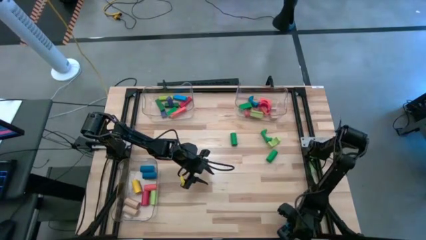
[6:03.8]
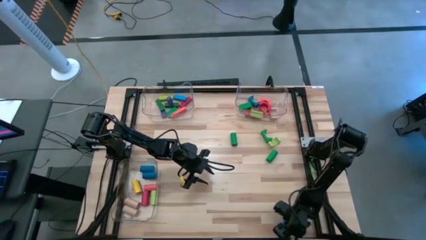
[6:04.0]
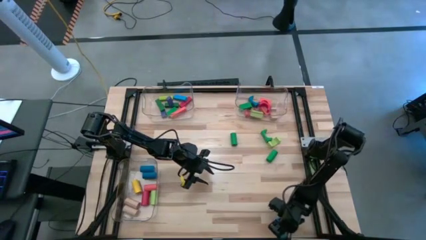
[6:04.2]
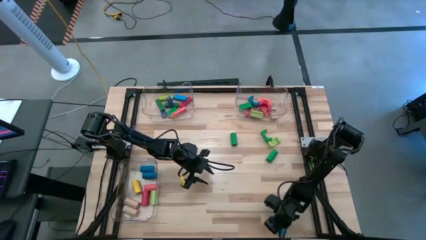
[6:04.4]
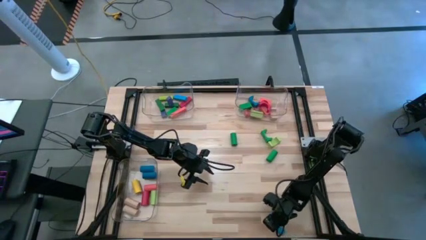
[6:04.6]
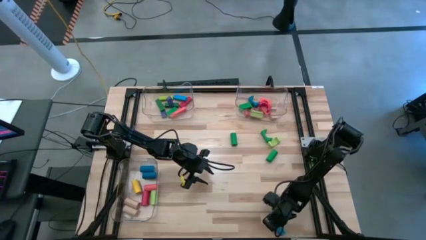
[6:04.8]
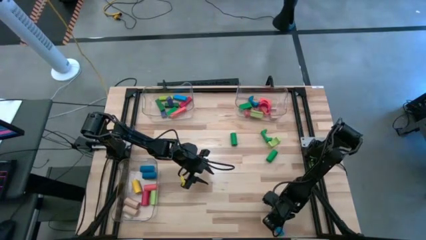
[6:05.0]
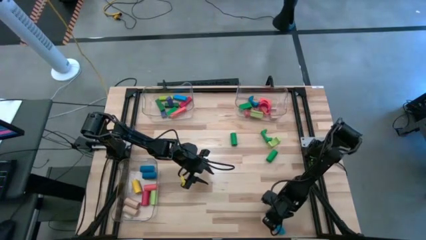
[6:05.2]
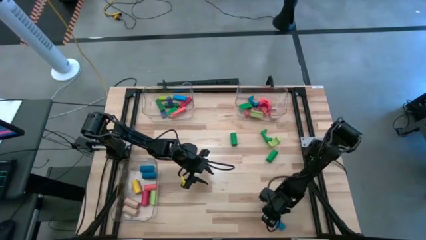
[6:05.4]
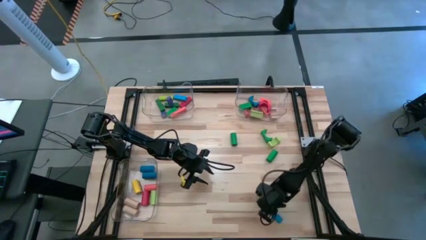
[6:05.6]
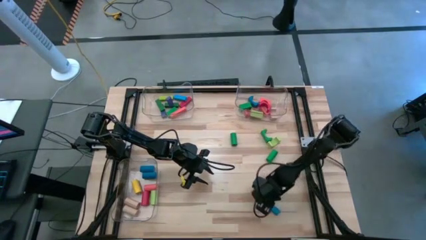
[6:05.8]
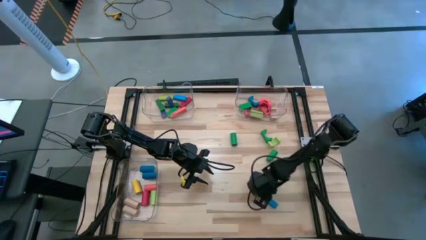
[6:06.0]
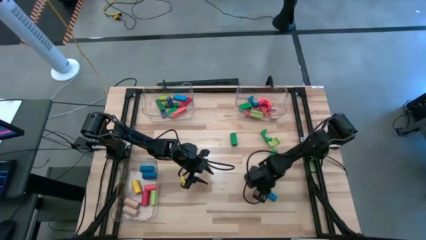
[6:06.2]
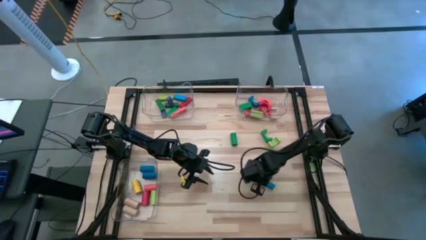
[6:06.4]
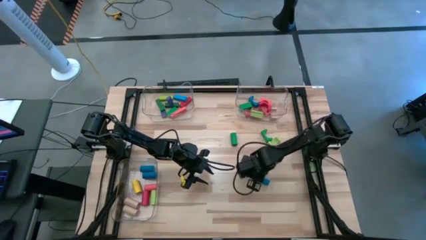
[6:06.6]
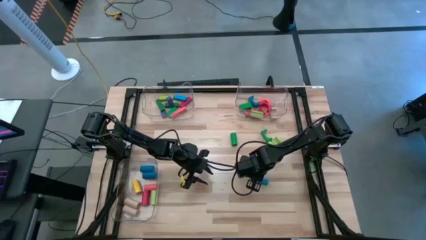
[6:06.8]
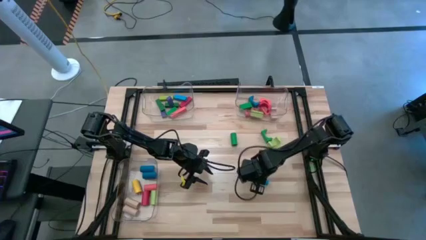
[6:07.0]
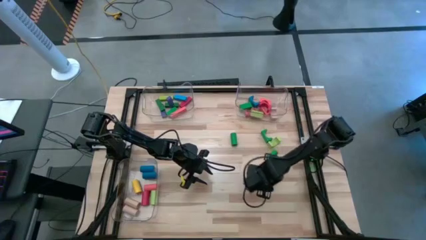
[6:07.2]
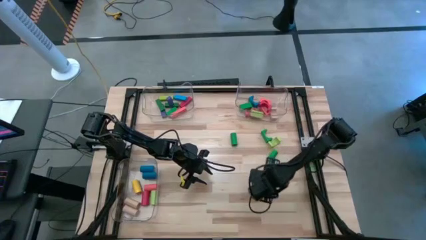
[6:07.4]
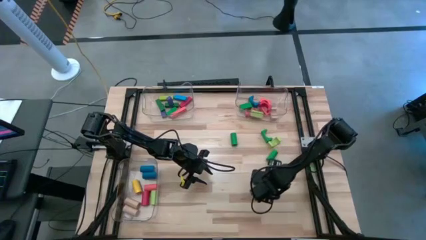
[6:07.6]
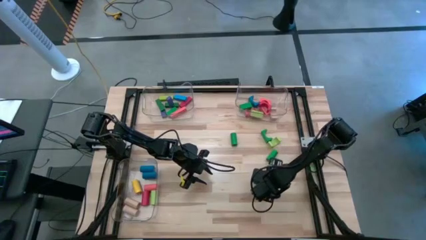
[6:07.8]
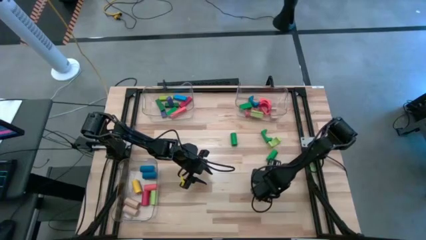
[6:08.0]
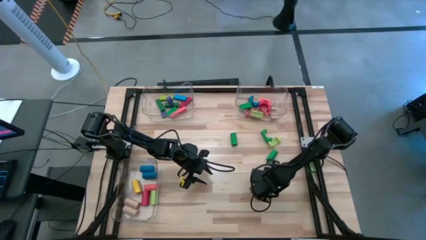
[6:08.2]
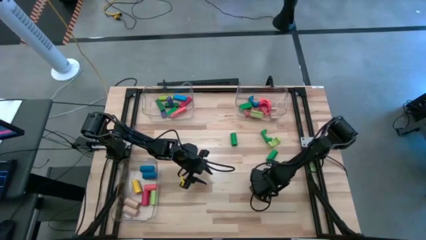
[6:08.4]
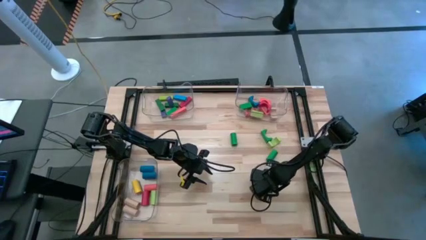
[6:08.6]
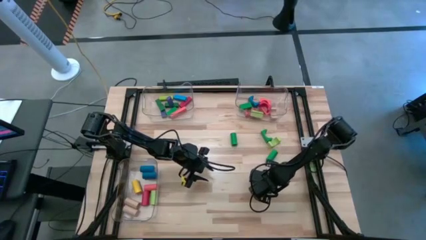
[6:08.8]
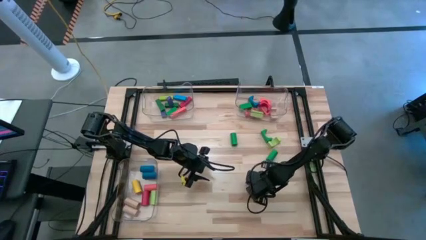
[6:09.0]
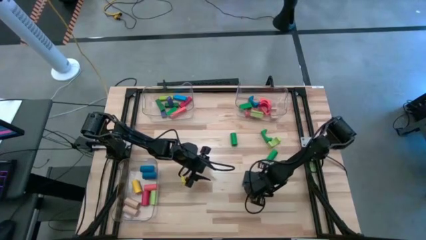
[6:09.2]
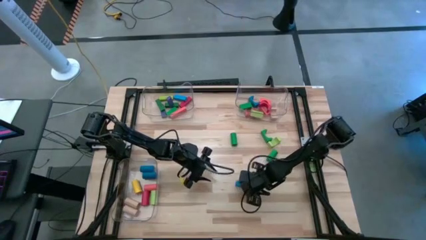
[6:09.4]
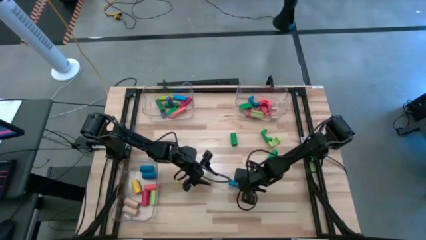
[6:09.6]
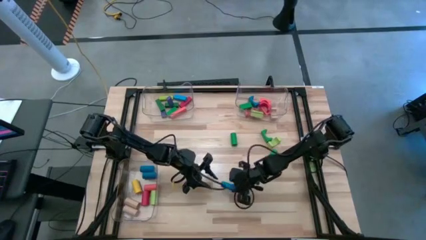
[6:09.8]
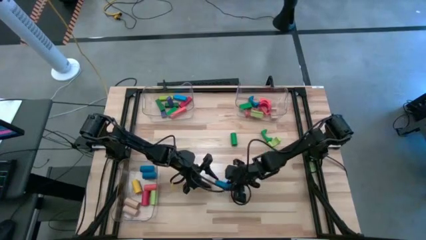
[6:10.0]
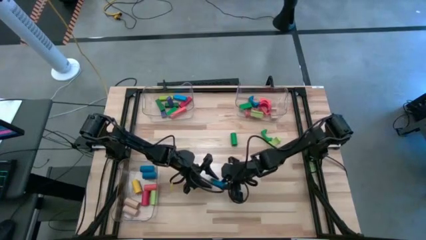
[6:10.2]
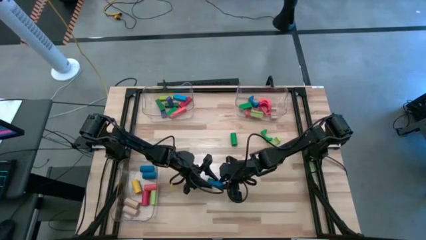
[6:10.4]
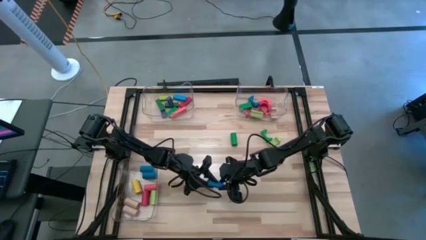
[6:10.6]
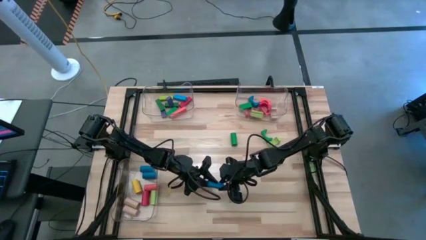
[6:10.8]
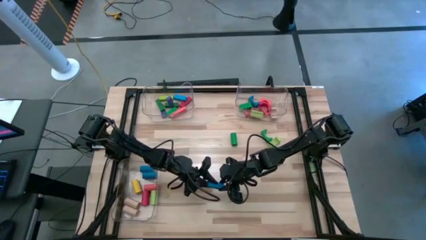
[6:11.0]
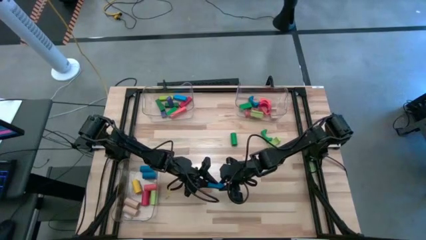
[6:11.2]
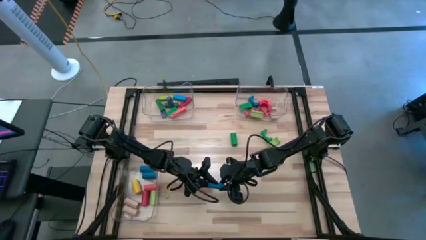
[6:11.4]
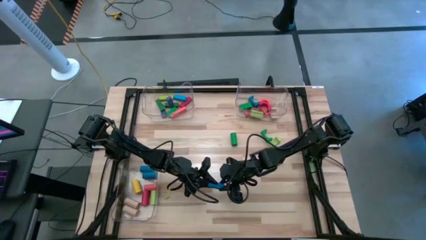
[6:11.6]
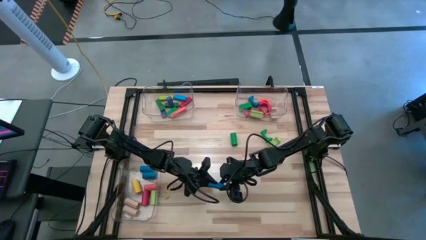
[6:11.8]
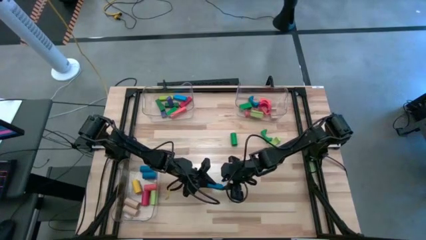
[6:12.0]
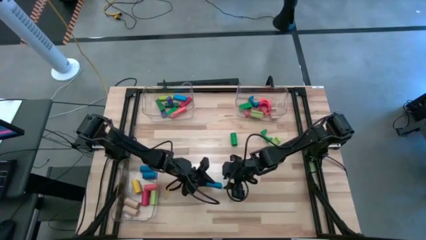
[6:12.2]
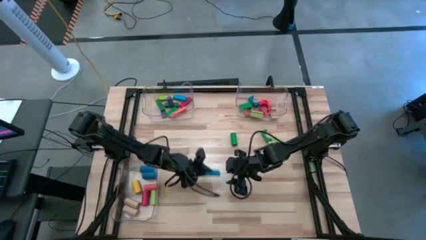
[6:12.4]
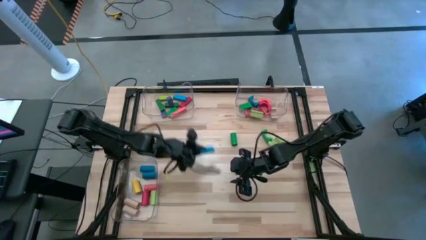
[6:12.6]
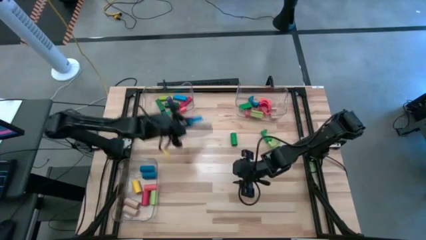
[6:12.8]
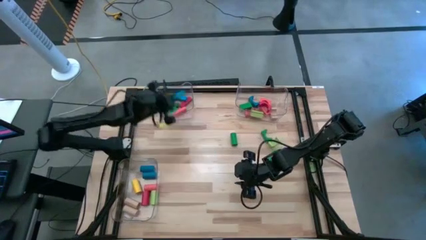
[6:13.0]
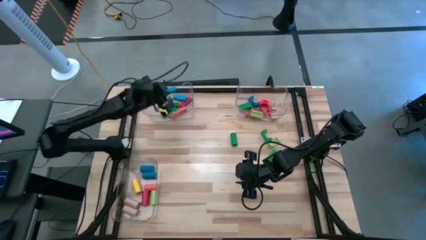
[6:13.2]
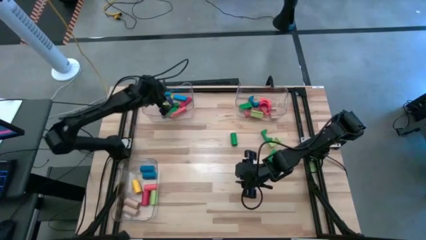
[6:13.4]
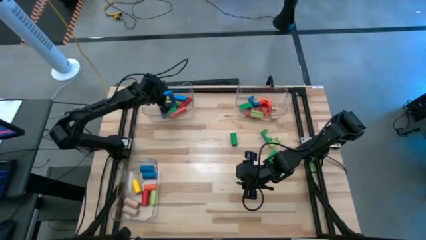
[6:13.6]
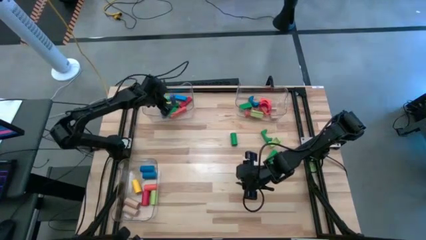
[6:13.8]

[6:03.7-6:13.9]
Task: Sort blocks by size
Put the blue rectangular block into the top left transparent bin

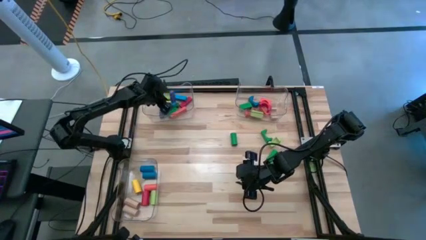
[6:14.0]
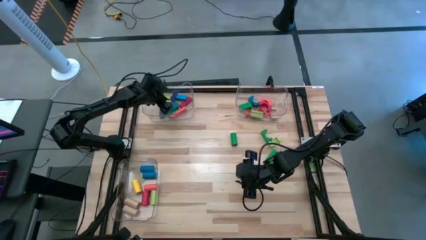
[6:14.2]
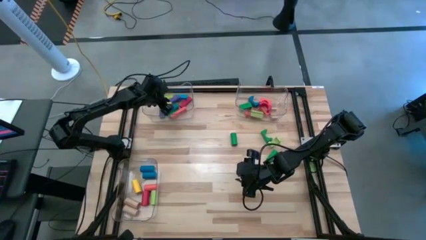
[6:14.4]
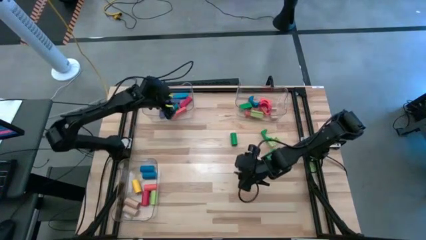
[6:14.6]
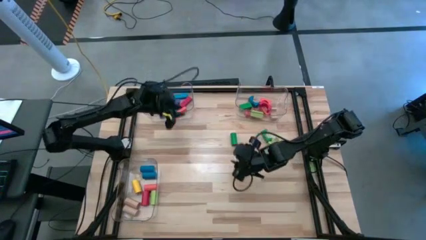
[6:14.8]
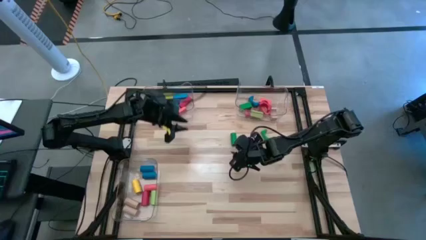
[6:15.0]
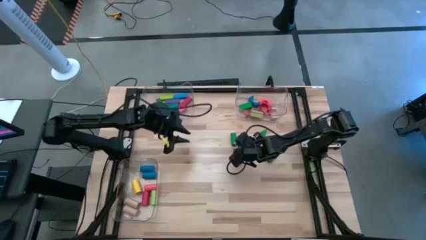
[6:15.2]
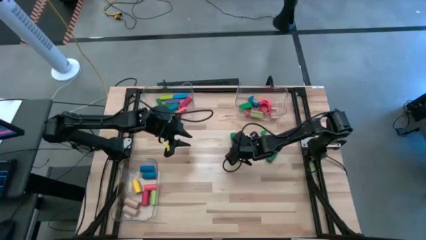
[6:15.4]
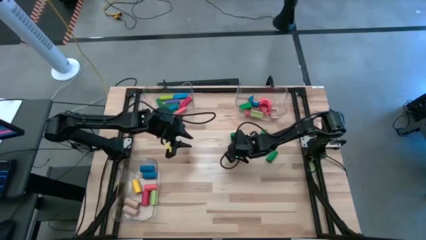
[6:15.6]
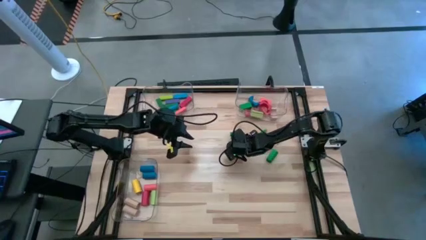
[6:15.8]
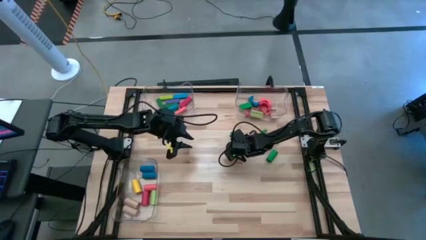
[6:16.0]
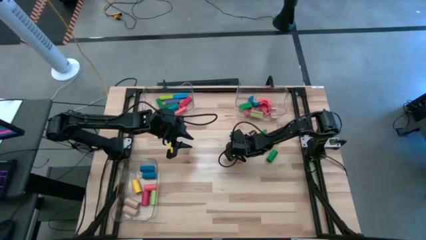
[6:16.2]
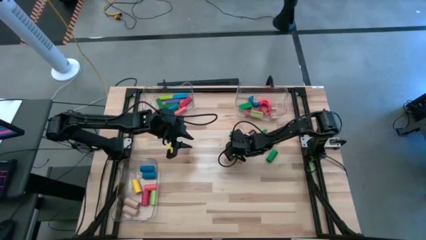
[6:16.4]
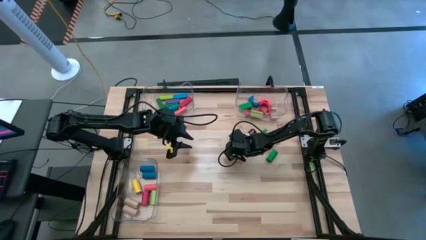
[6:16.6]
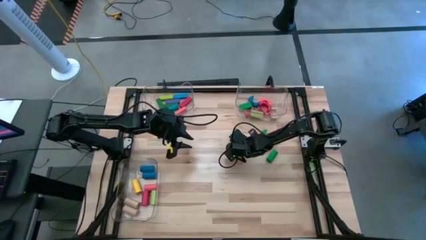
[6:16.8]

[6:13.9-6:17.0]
Put the green cylindrical block into the bottom left transparent bin

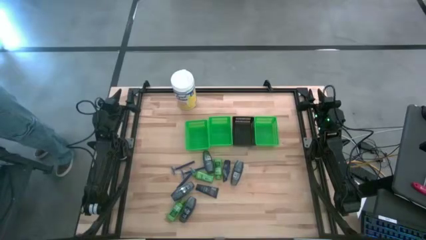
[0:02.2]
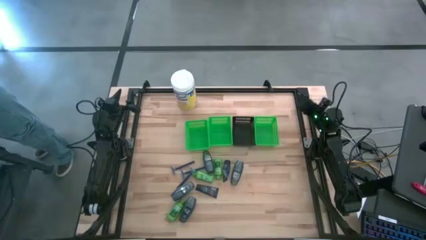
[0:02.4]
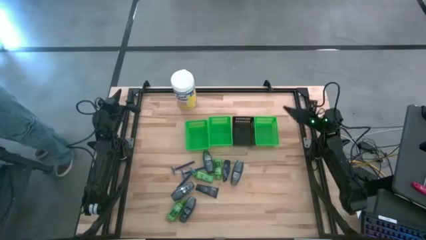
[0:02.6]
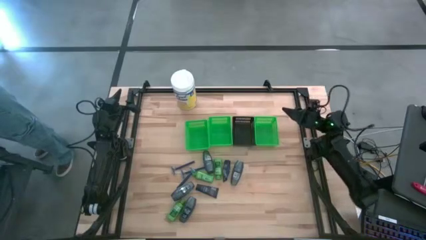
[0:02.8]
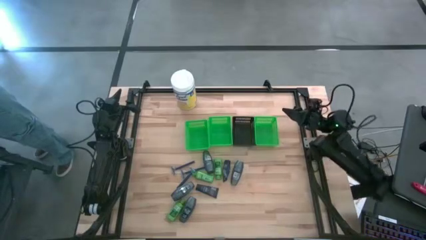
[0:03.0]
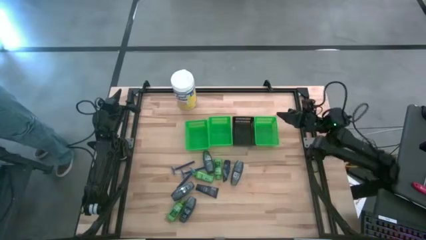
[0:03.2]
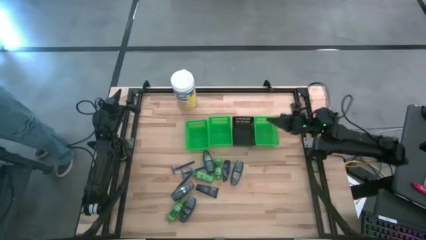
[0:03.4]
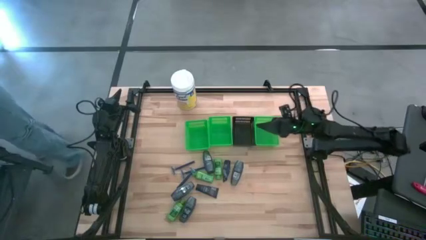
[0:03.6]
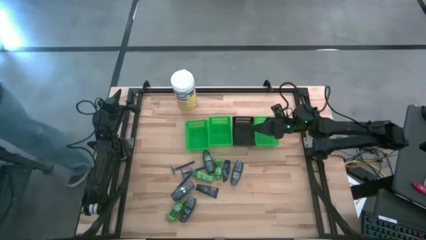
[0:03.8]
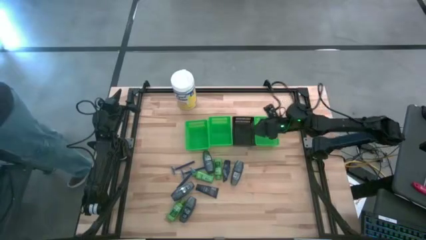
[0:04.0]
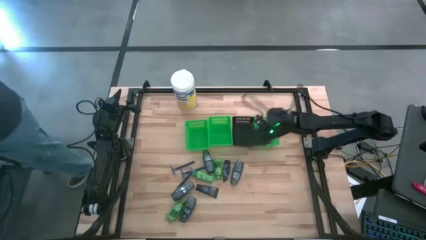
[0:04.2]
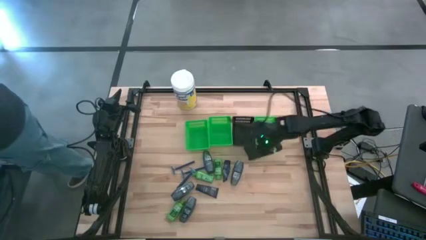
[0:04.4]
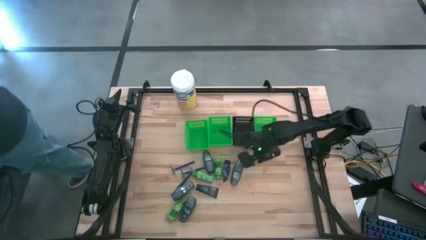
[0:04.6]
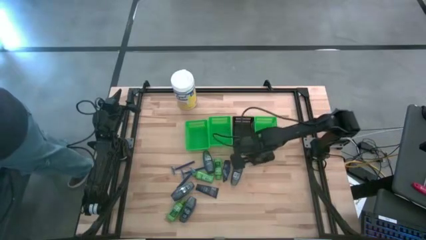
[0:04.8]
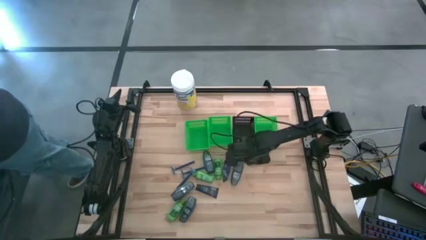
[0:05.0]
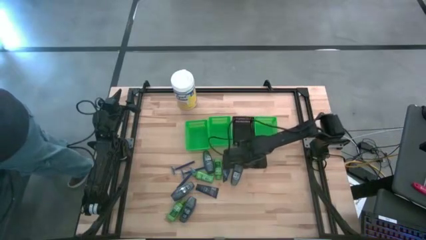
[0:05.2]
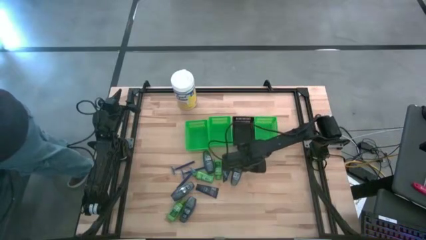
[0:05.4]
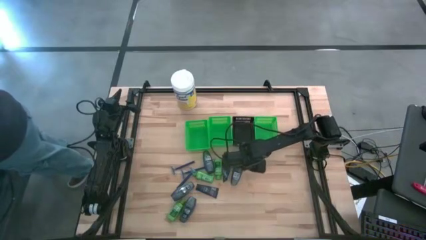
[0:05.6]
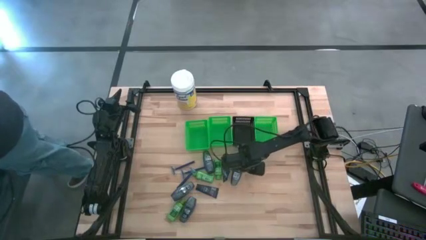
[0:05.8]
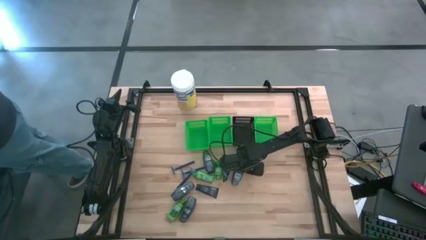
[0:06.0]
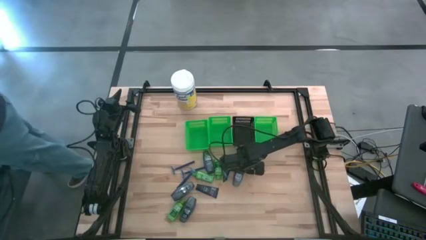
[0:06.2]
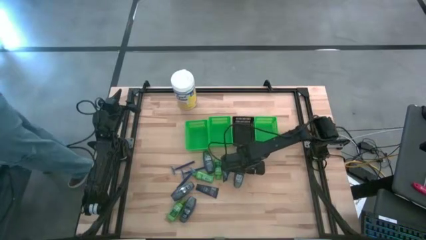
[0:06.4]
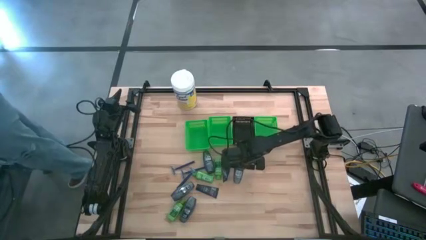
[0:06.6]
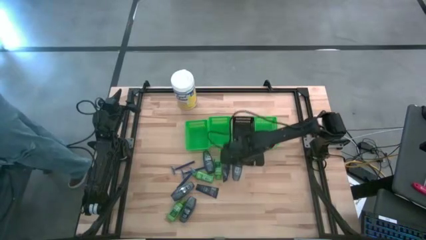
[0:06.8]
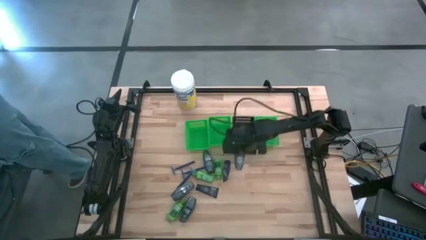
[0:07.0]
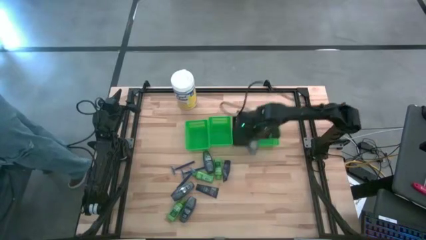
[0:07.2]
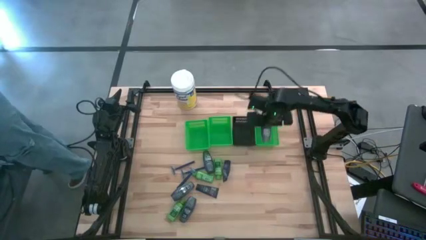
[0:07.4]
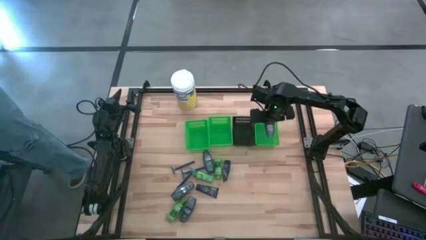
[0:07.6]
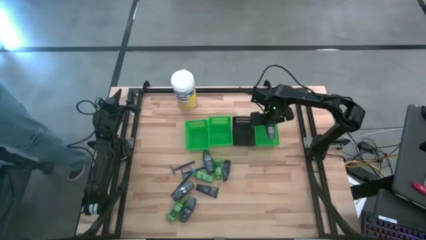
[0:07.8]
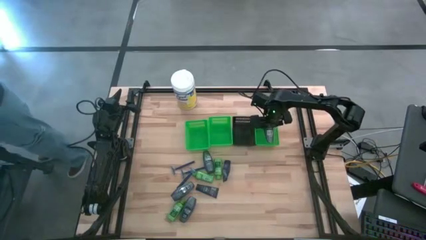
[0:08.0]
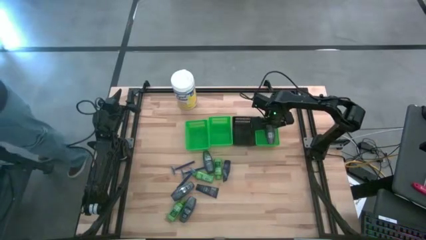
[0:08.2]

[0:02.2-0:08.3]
Task: Pick & Place Travel size toiletries
Put the deodorant into the right green bin
